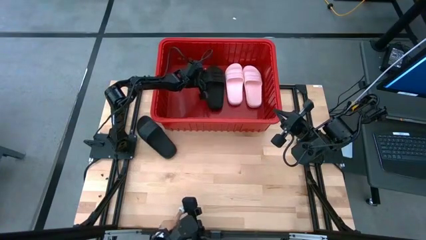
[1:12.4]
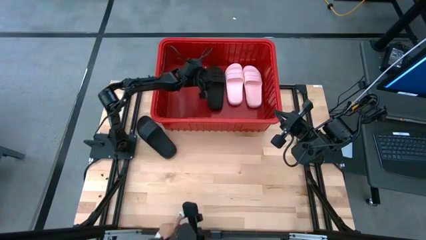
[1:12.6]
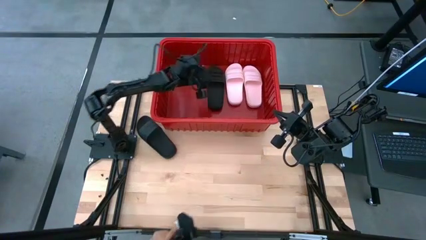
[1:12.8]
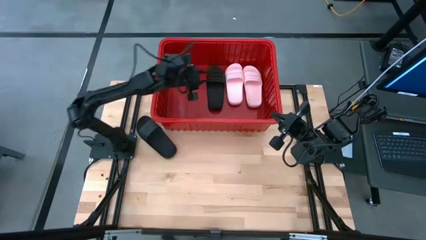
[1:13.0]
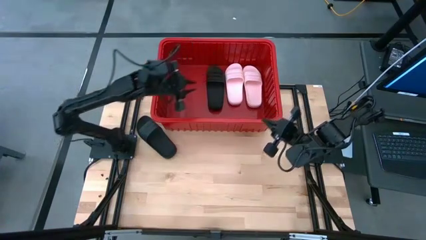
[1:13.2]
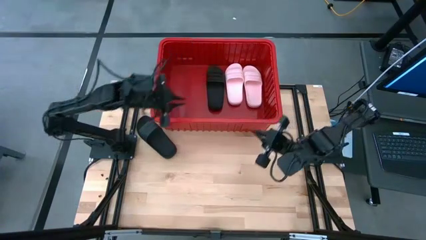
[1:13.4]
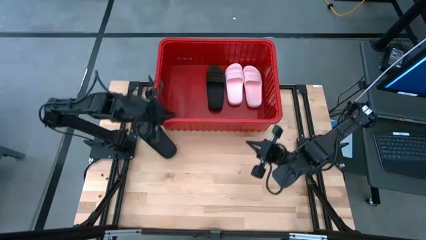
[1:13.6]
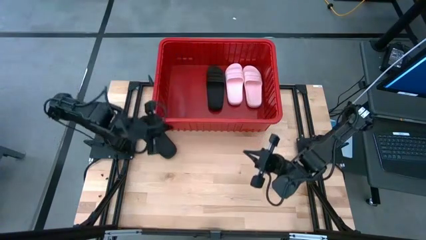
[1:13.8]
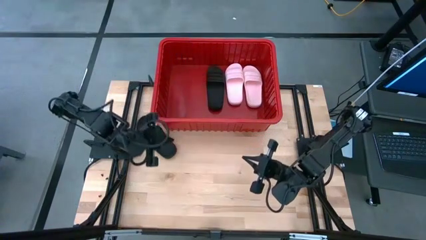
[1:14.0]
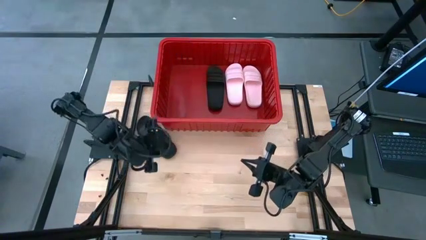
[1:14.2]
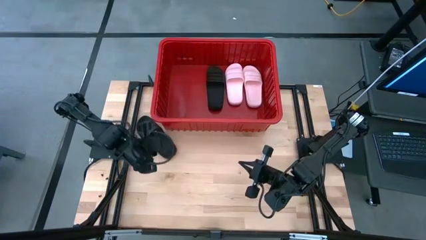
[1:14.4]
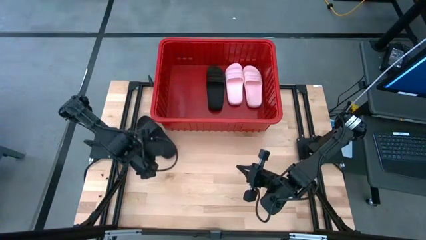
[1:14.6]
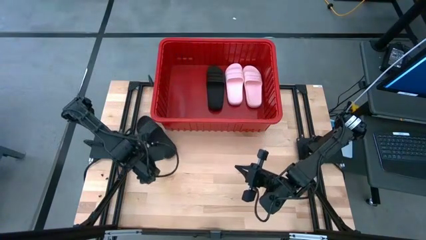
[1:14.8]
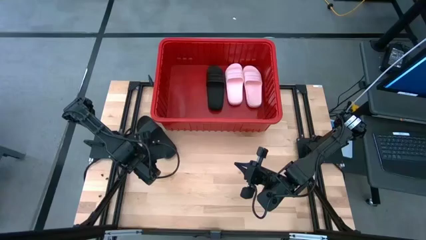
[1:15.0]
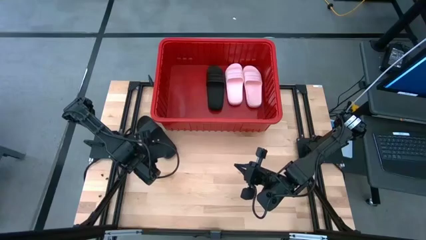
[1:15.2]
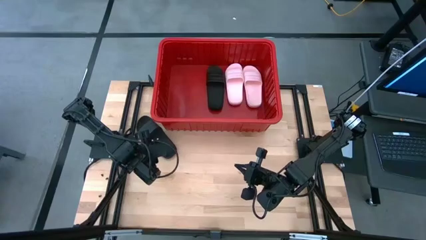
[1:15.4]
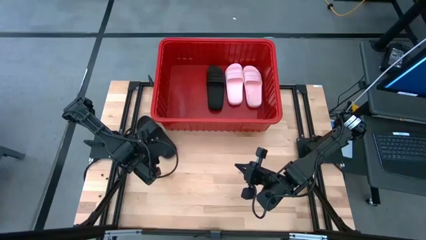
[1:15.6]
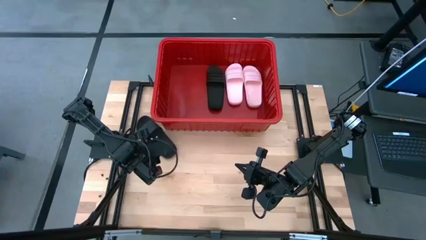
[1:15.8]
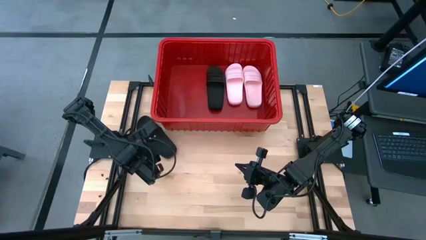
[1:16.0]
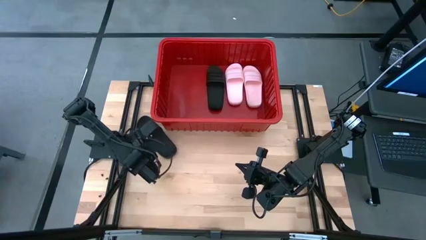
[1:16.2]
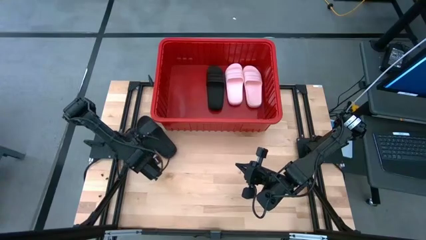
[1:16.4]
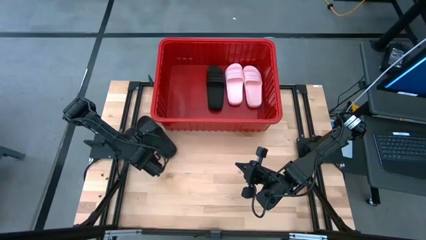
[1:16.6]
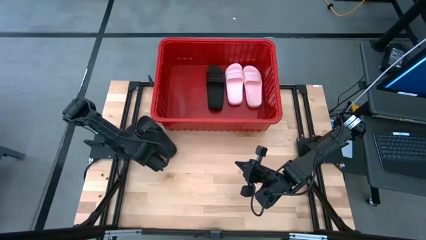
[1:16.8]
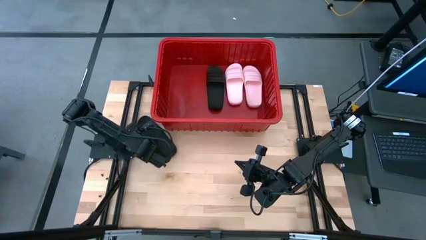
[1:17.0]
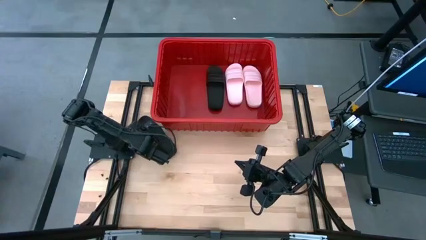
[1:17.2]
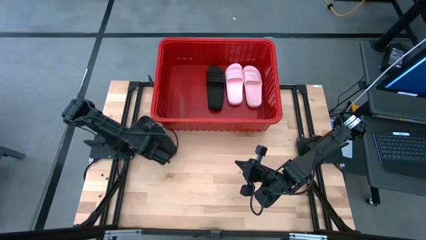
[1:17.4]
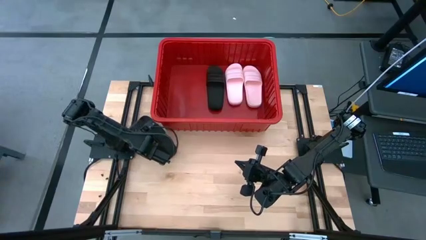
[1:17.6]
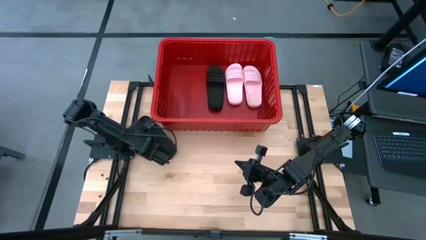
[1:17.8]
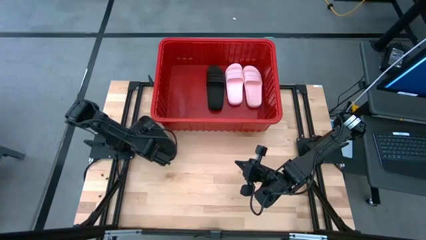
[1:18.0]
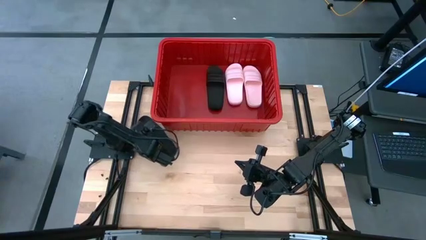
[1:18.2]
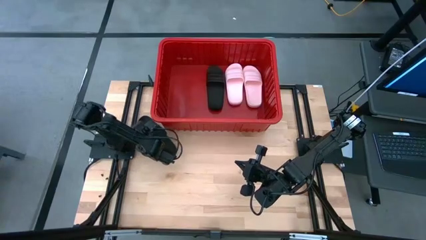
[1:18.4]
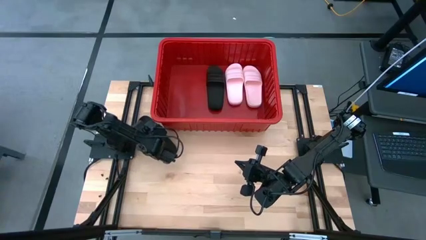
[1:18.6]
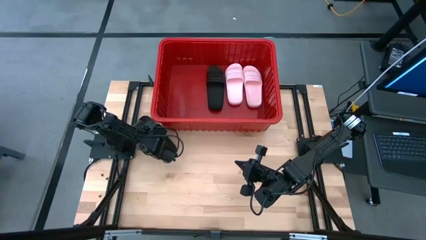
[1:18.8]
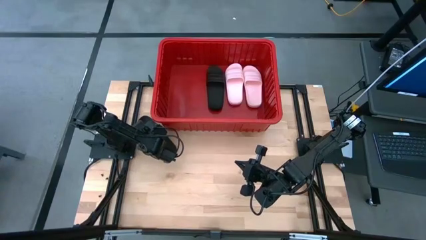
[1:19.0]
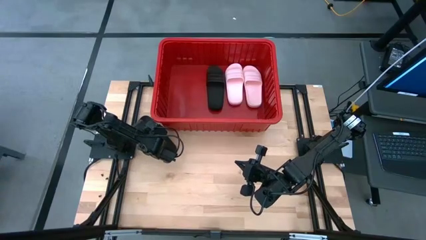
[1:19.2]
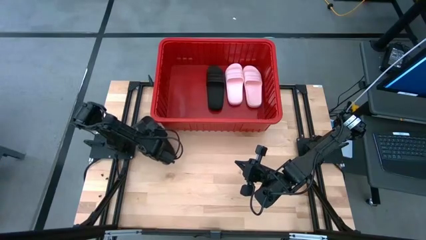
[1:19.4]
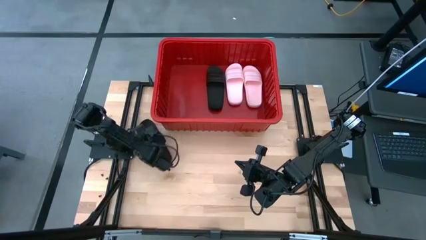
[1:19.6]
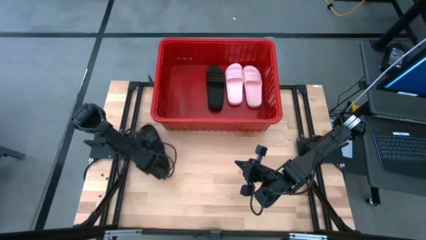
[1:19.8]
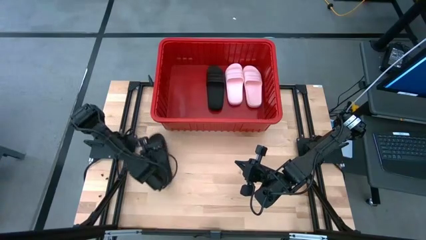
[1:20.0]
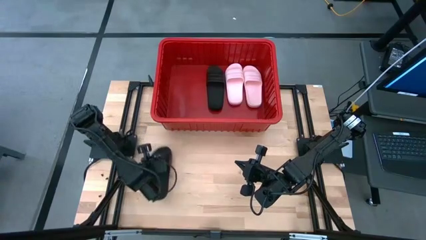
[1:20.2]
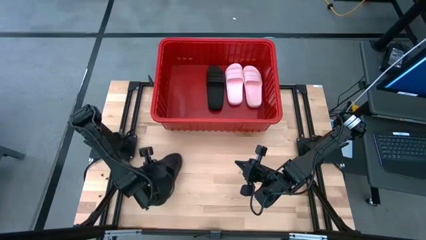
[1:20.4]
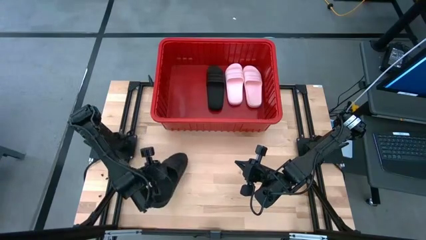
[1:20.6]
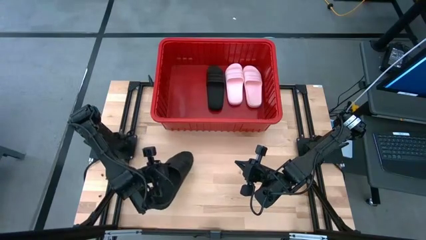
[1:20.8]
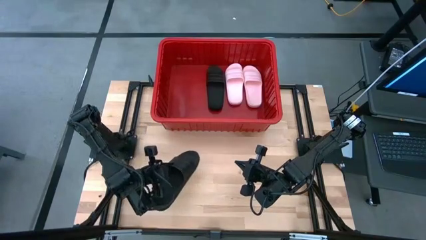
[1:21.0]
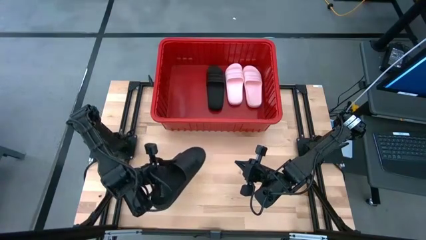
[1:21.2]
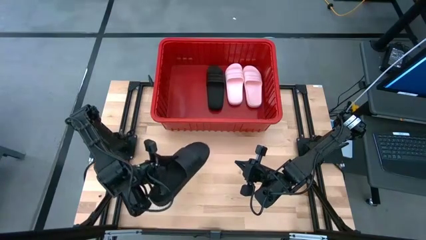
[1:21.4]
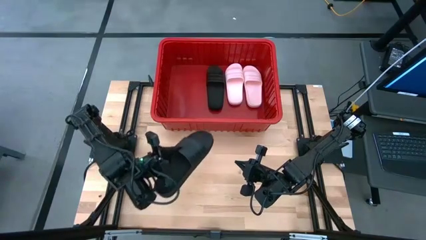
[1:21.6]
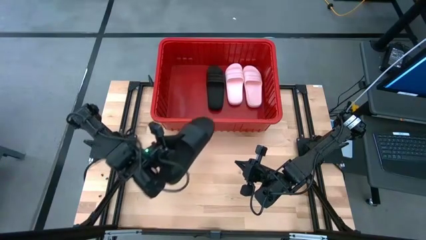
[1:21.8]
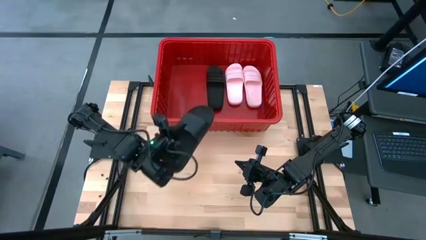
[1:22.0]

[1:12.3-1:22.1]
Task: Pick and place slides into bin
Put the black slide into the red bin

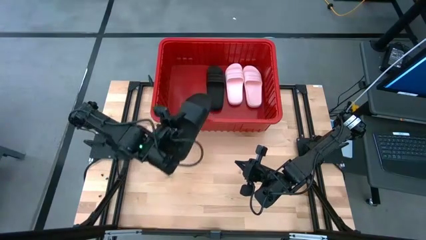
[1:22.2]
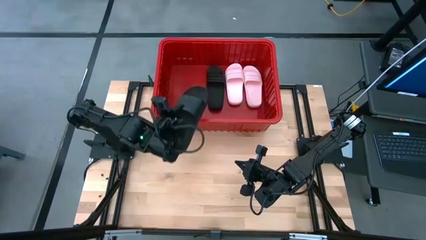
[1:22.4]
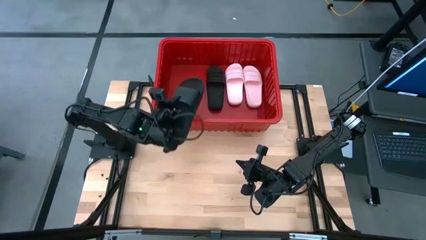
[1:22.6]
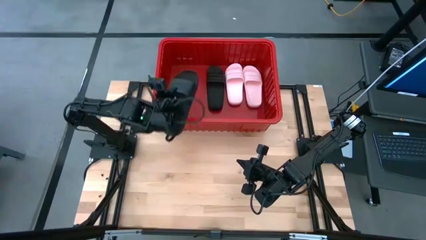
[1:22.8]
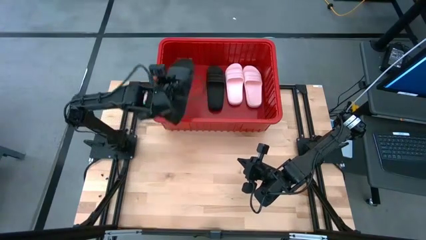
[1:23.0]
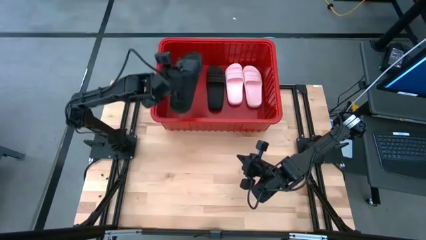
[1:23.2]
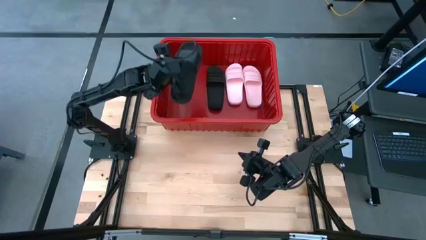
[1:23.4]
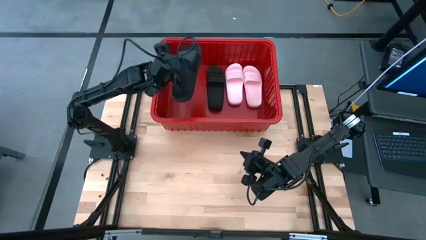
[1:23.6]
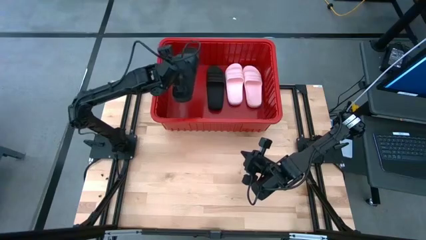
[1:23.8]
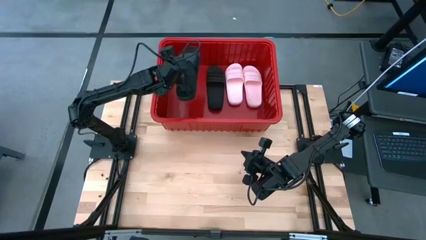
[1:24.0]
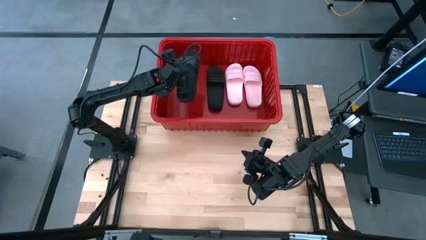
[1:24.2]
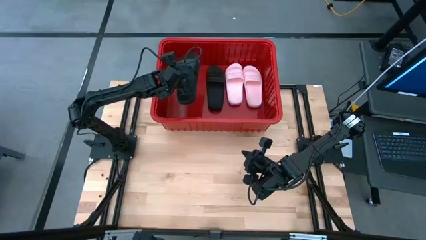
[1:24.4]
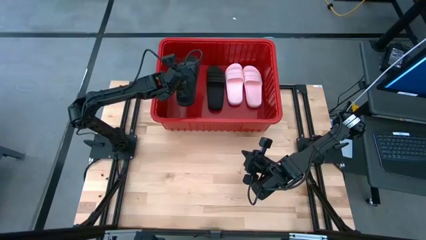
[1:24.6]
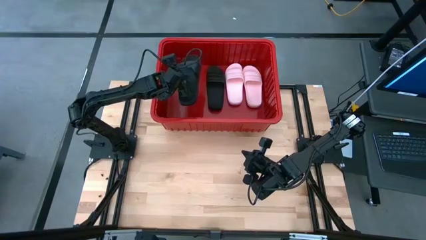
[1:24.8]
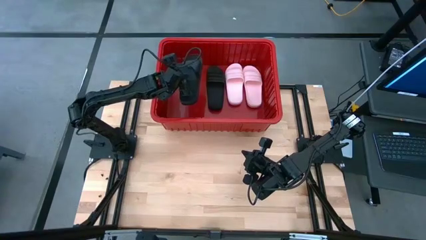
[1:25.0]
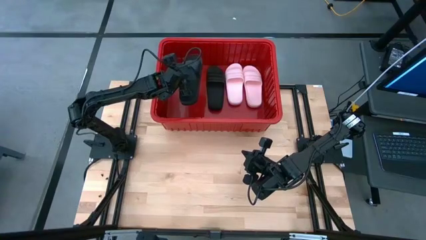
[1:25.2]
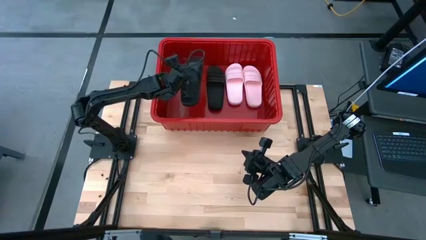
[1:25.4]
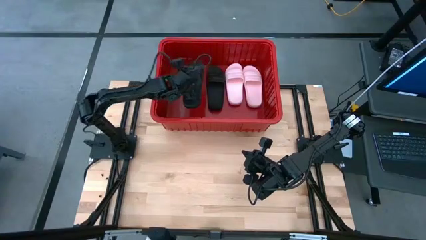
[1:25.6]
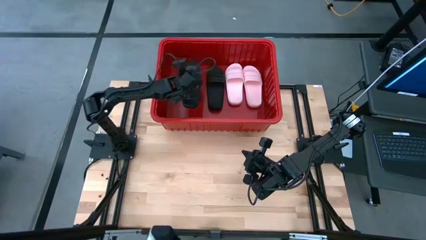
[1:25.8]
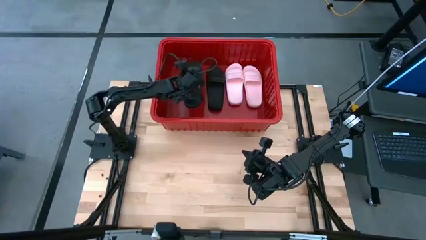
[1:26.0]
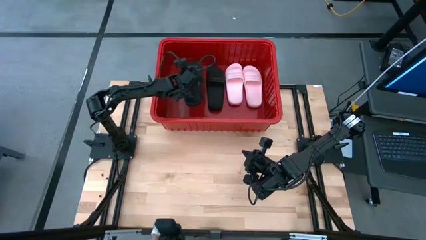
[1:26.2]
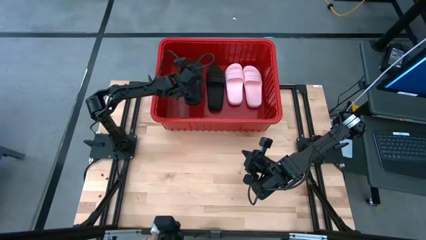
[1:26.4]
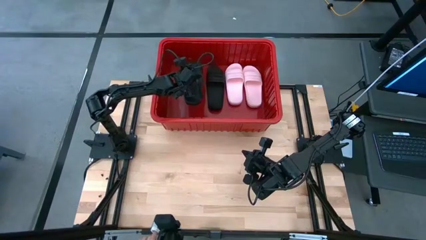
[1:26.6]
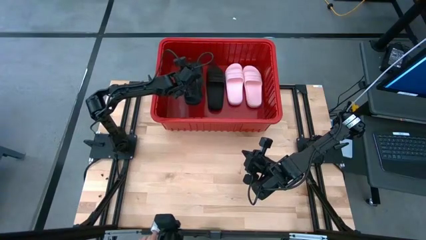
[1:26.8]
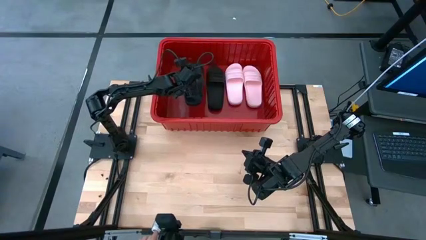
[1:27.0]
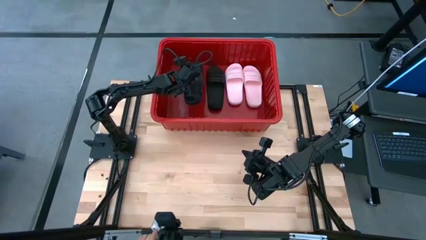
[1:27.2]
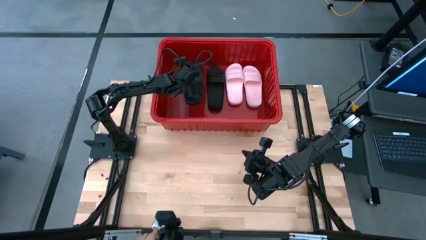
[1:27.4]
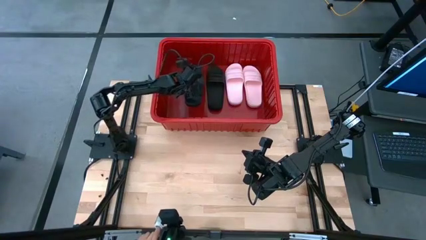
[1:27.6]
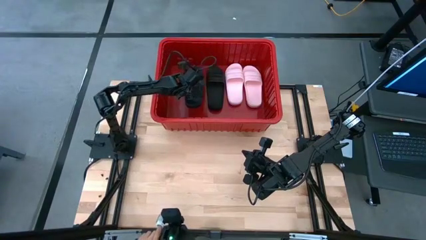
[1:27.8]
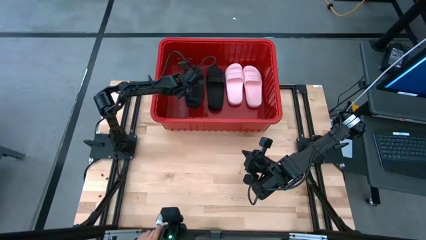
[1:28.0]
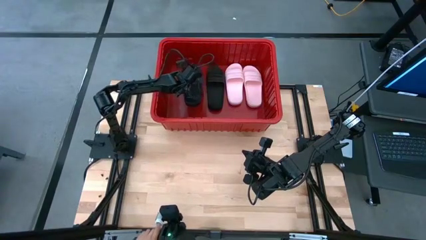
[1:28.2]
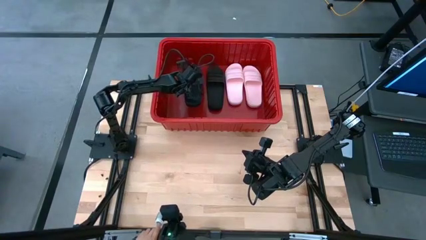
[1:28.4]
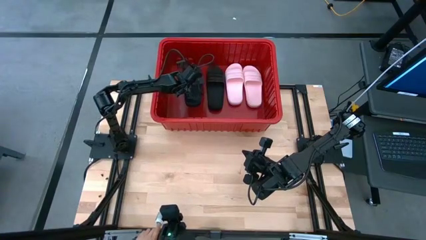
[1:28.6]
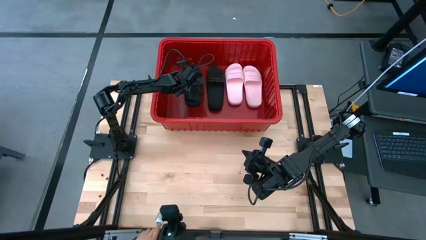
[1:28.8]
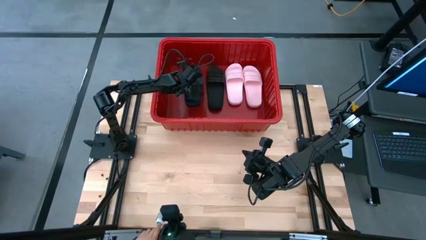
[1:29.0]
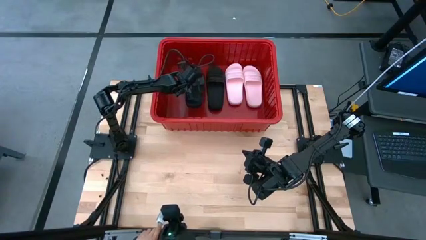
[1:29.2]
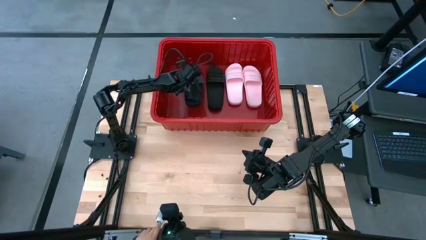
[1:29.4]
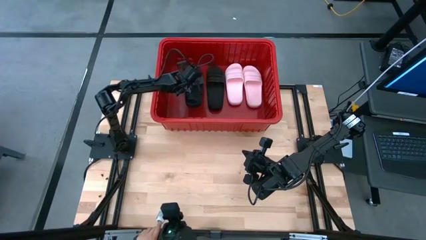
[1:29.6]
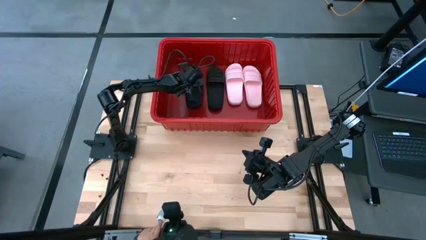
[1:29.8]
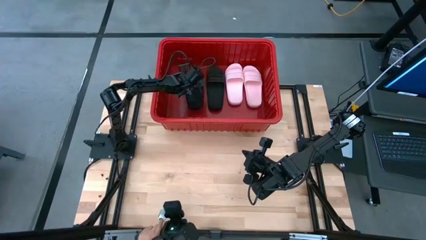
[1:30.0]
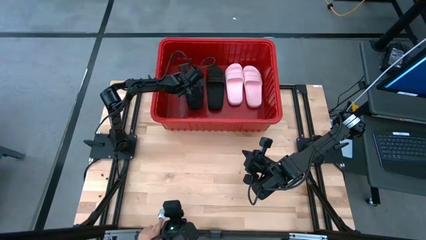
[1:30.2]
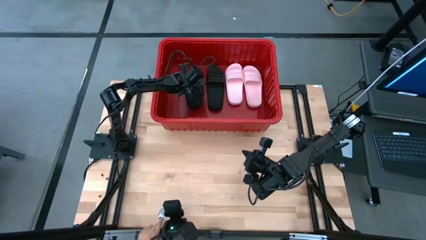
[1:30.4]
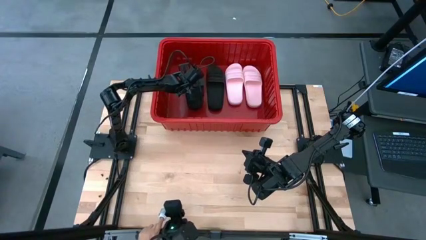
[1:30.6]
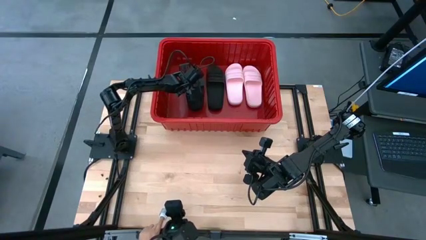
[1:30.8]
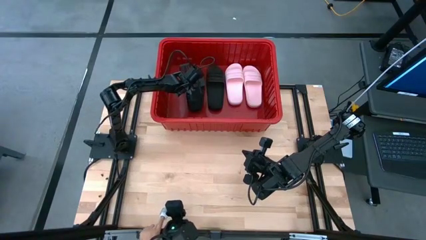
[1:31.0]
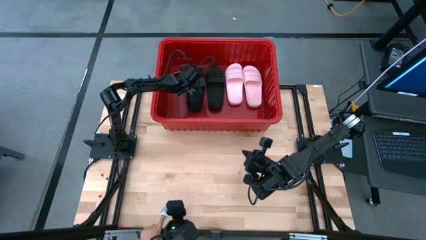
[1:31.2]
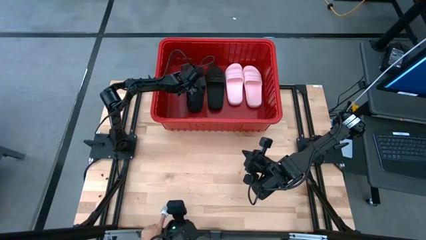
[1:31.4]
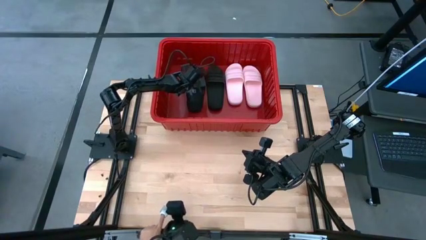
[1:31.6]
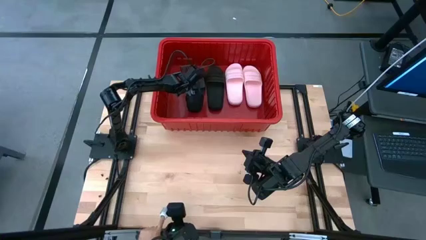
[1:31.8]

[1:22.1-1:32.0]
Put the black slide into the red bin
